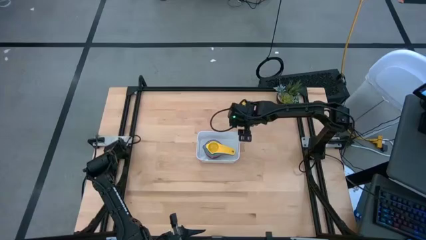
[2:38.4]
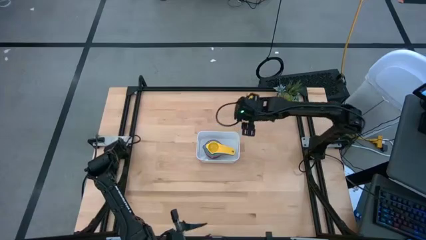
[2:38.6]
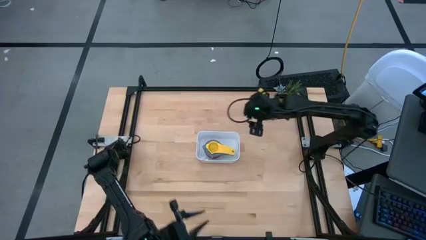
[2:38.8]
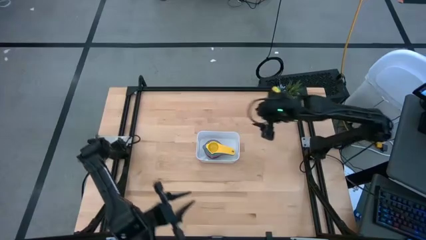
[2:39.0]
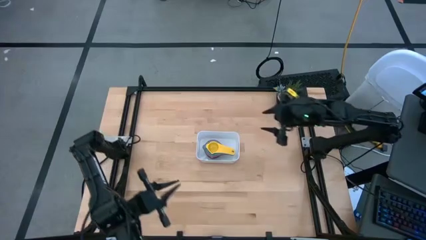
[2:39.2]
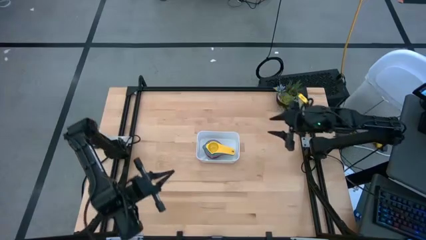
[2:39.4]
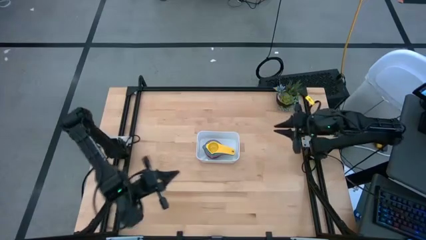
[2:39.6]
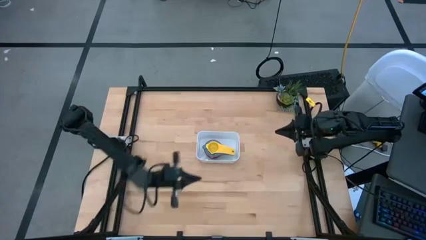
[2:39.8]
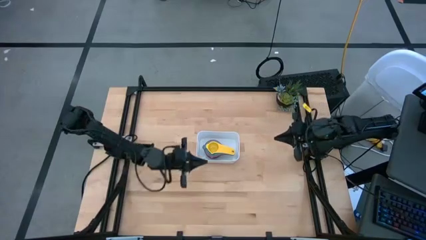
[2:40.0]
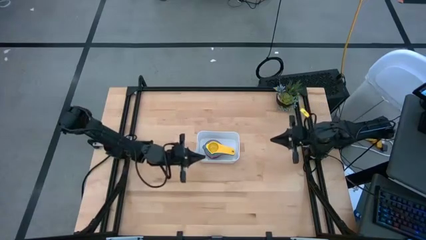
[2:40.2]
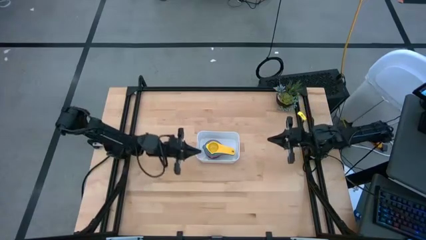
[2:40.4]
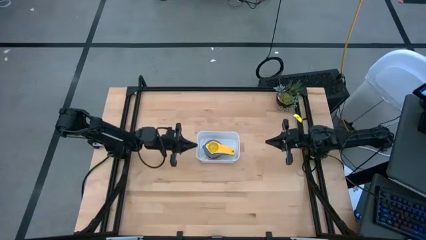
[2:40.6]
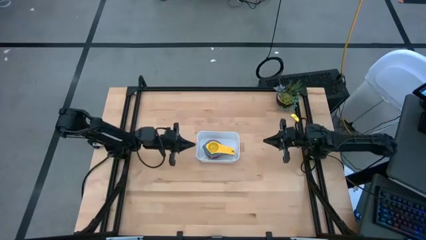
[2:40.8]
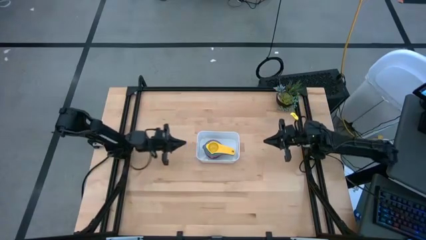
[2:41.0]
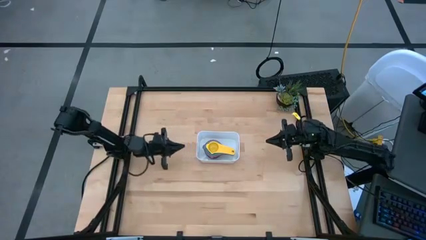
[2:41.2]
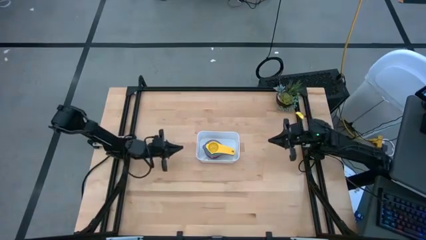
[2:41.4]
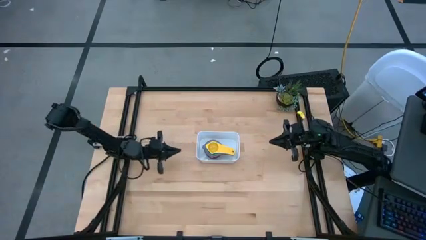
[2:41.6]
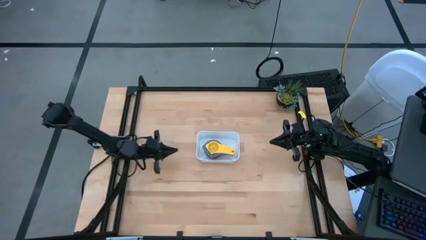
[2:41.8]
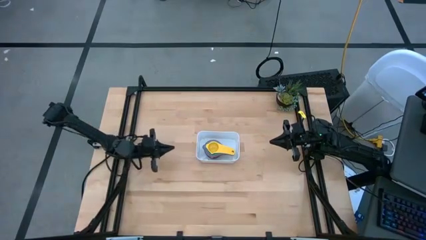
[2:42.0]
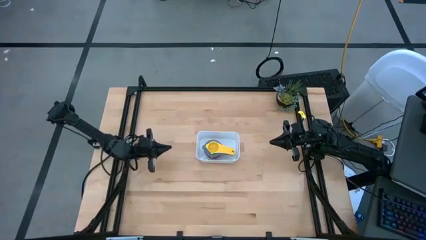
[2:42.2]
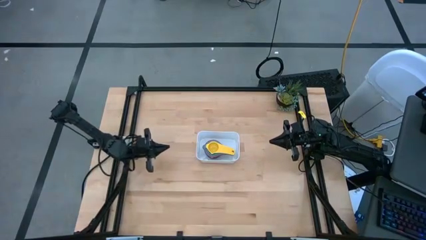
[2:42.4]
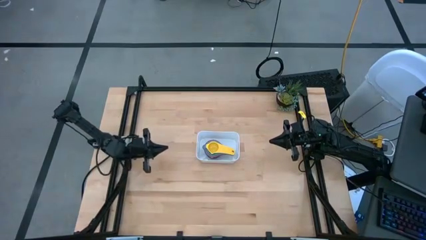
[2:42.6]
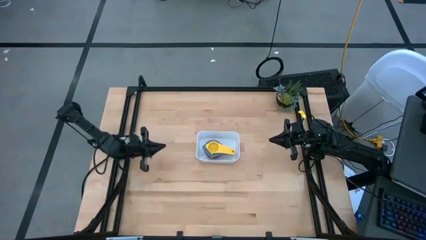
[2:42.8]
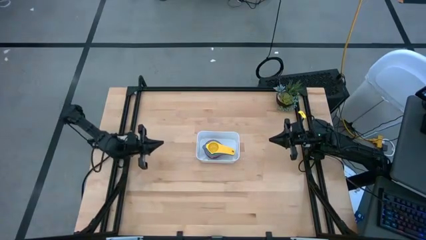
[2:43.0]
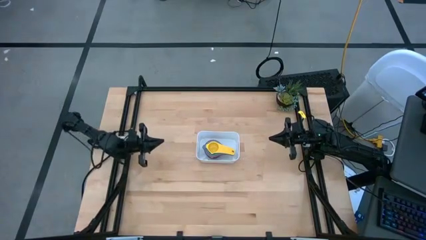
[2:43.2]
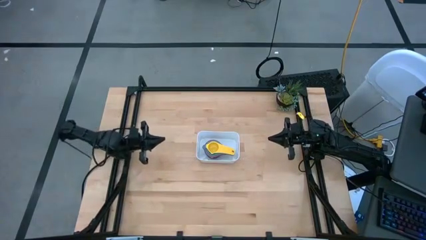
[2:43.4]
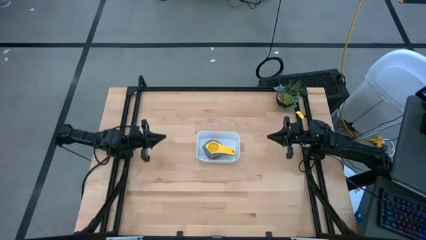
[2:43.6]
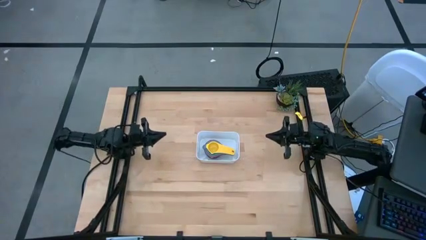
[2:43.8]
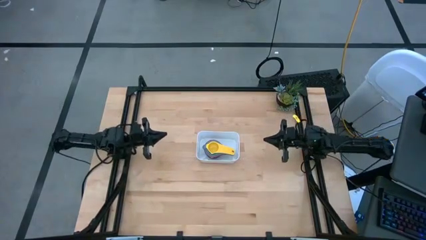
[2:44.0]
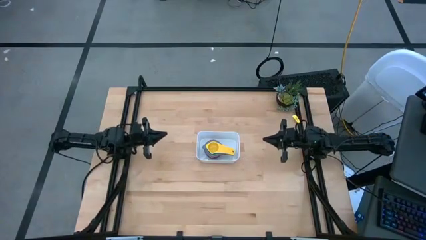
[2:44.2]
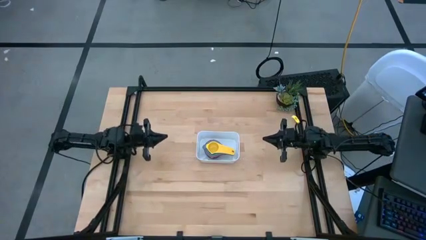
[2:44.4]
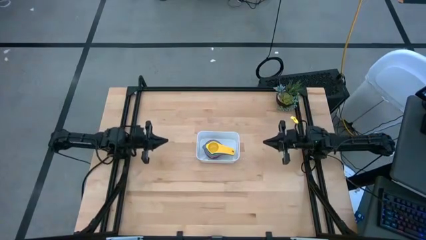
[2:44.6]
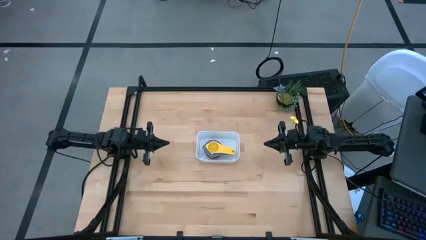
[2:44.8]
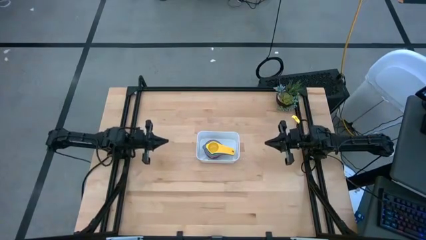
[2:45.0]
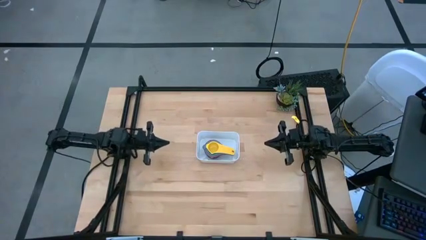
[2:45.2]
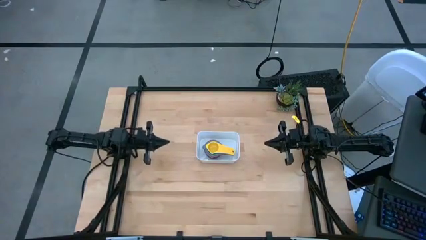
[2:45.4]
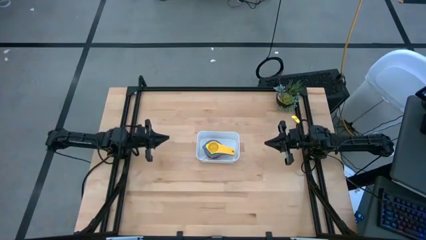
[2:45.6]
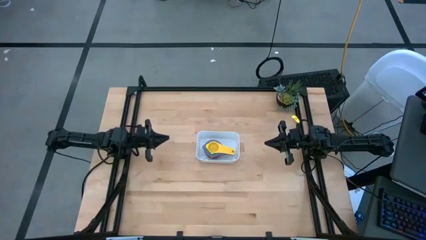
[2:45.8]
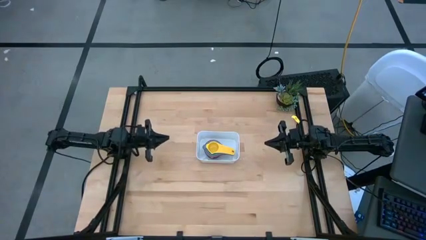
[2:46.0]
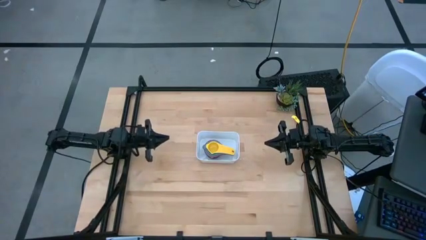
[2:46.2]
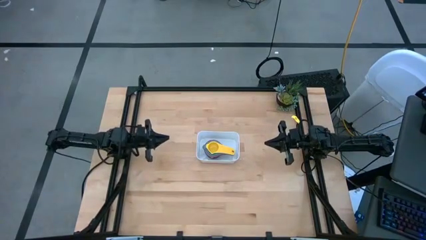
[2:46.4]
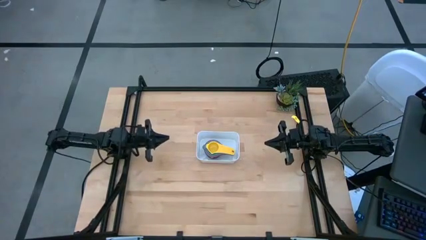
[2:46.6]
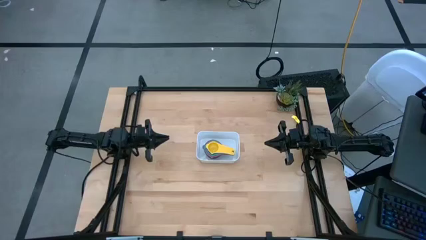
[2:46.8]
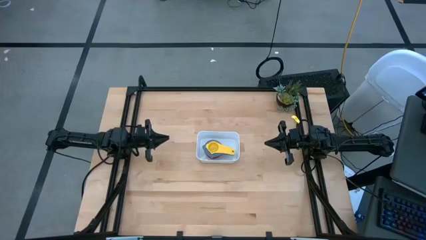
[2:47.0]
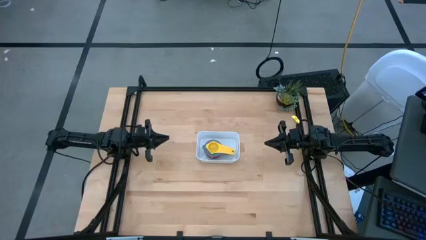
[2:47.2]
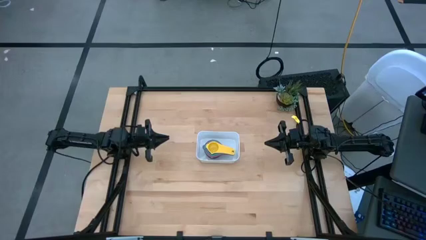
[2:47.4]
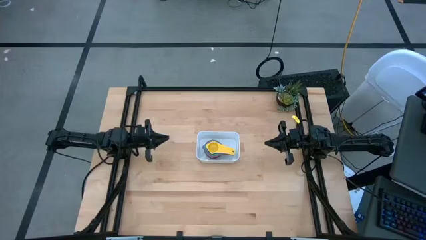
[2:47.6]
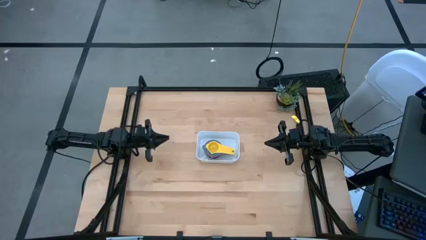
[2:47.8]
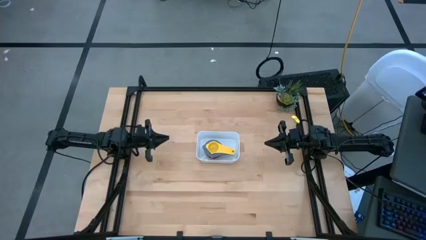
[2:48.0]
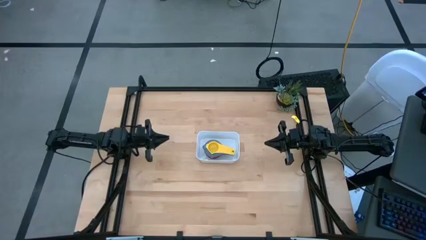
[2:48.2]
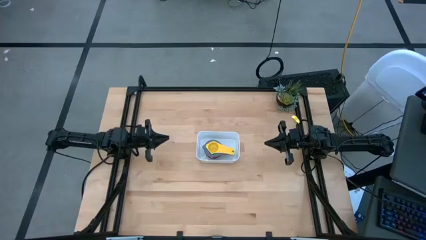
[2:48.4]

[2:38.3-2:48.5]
Task: Nest measuring cups in basket
Return to Home Position
